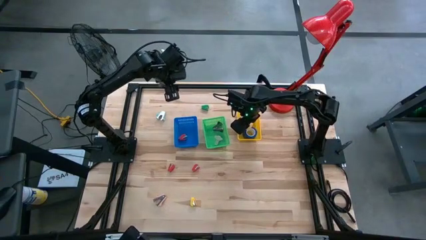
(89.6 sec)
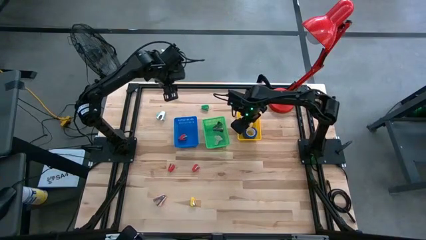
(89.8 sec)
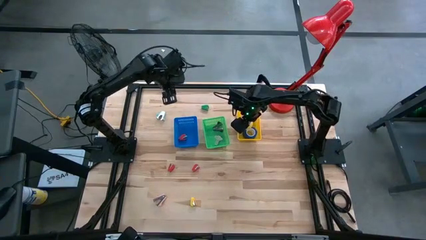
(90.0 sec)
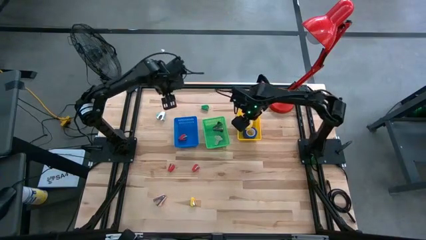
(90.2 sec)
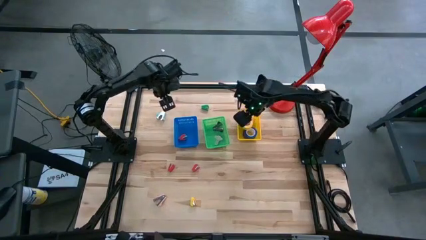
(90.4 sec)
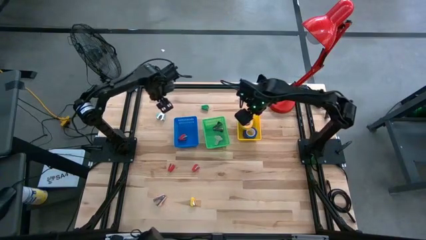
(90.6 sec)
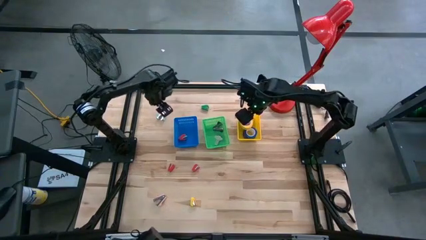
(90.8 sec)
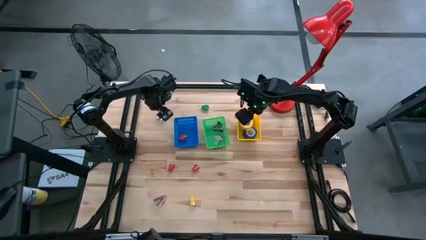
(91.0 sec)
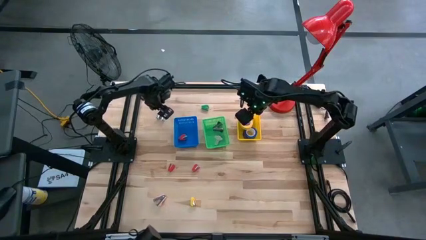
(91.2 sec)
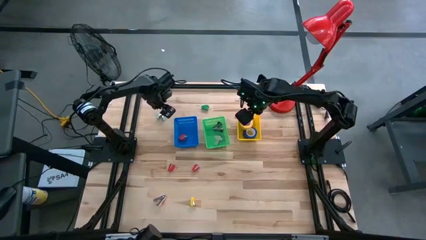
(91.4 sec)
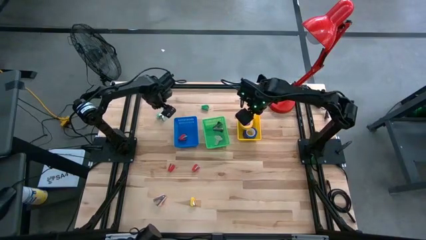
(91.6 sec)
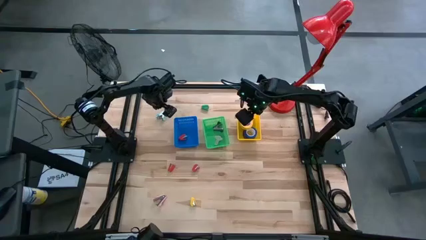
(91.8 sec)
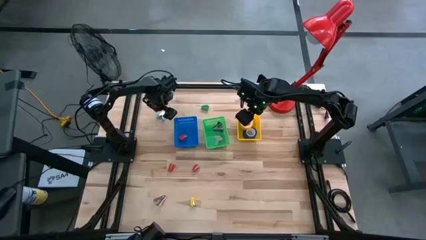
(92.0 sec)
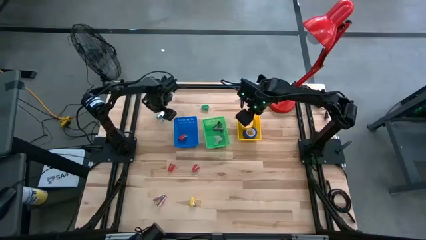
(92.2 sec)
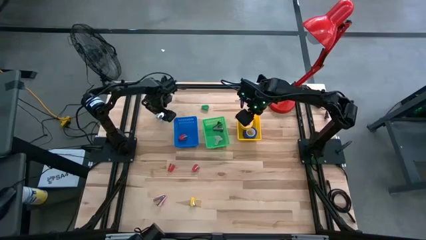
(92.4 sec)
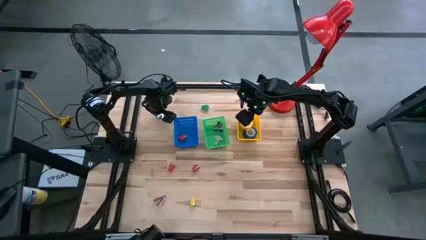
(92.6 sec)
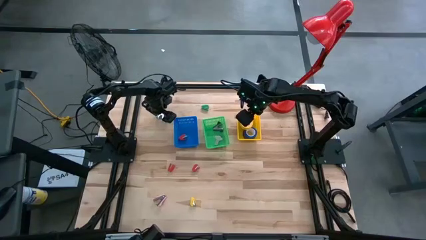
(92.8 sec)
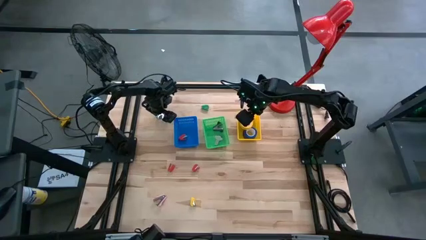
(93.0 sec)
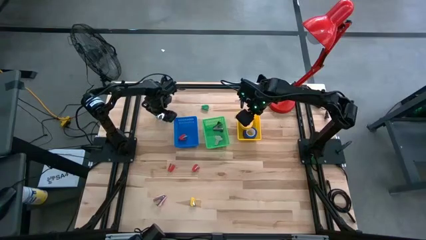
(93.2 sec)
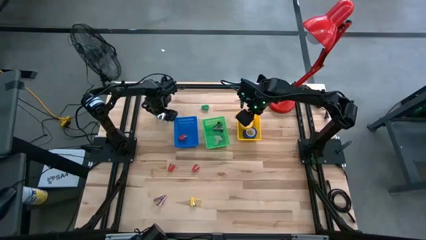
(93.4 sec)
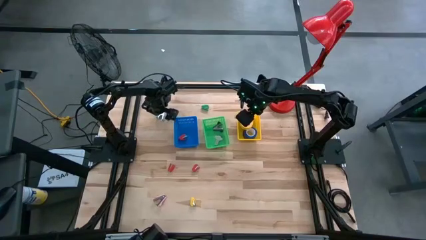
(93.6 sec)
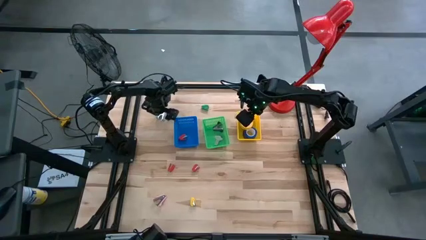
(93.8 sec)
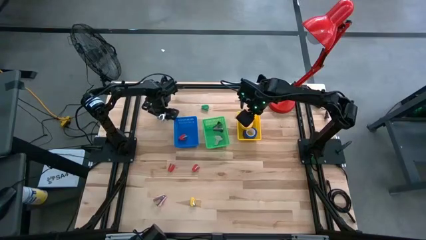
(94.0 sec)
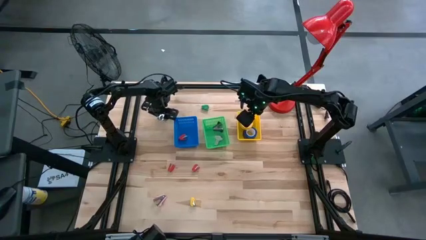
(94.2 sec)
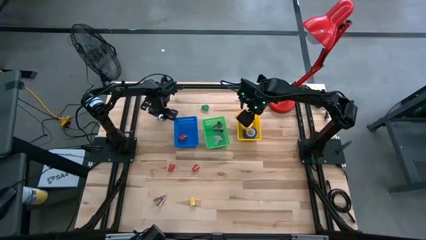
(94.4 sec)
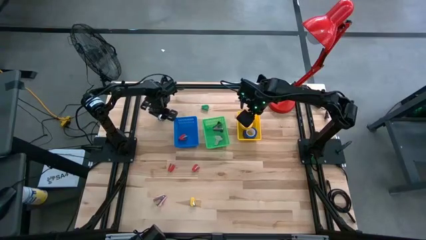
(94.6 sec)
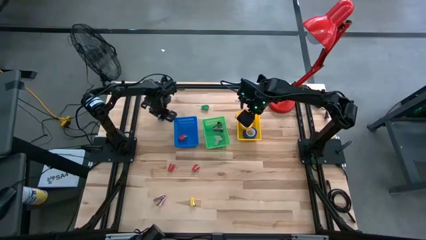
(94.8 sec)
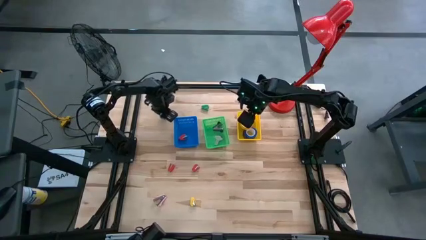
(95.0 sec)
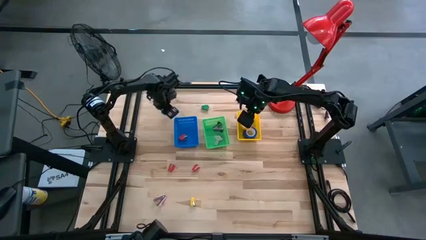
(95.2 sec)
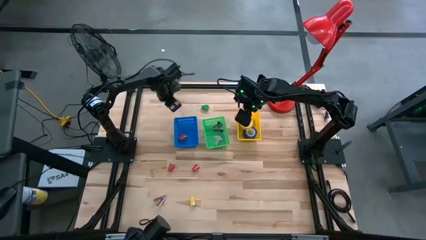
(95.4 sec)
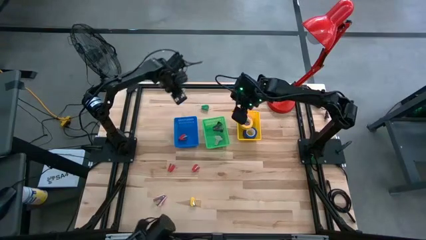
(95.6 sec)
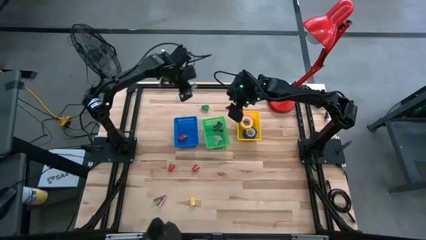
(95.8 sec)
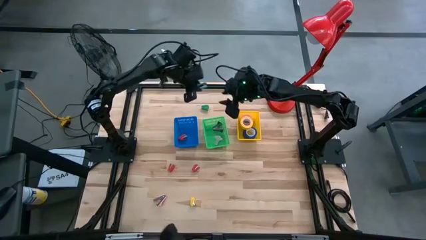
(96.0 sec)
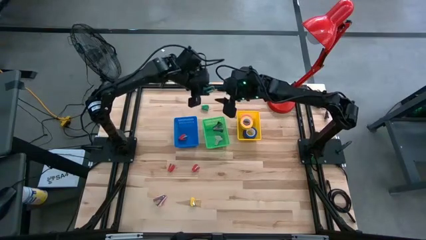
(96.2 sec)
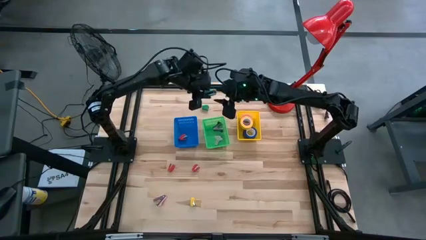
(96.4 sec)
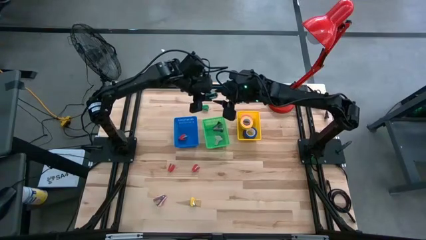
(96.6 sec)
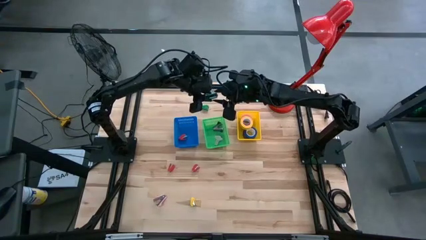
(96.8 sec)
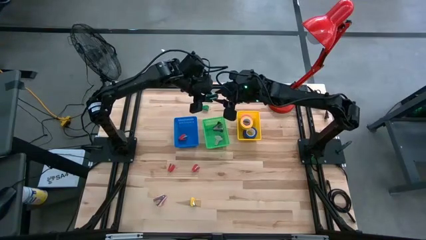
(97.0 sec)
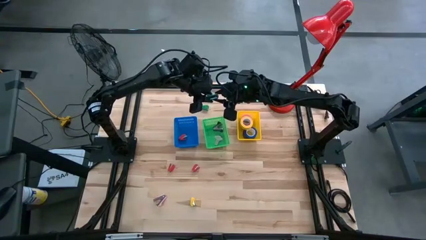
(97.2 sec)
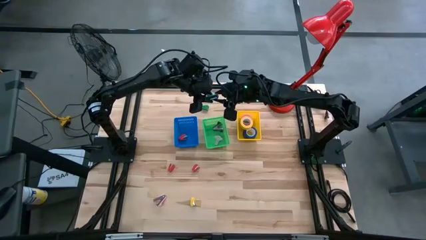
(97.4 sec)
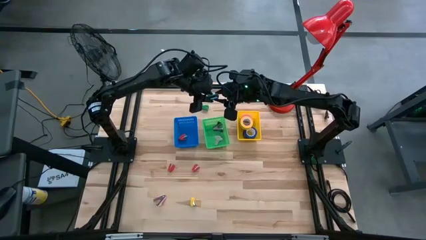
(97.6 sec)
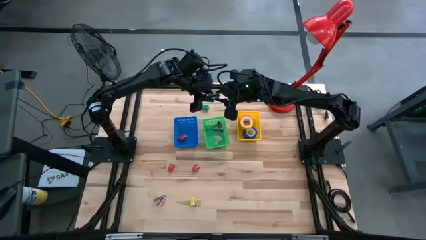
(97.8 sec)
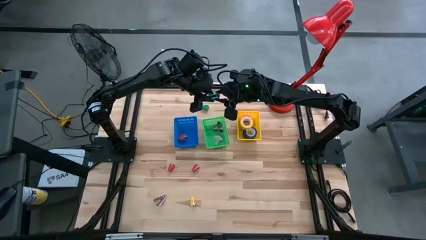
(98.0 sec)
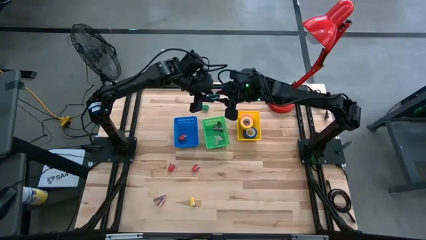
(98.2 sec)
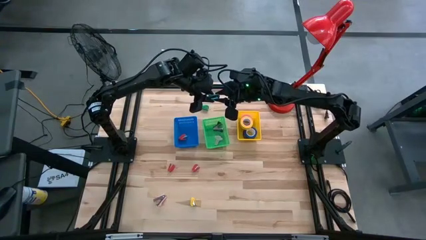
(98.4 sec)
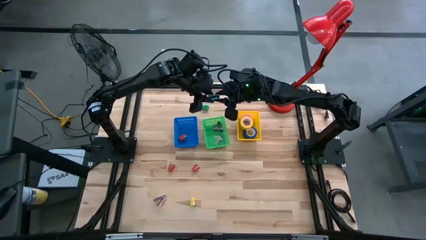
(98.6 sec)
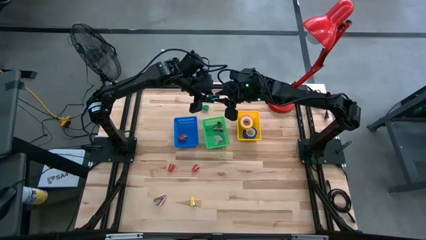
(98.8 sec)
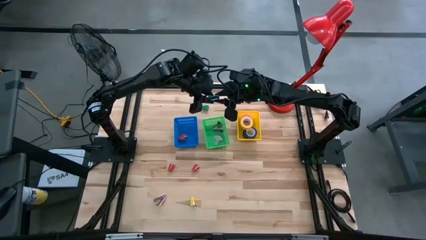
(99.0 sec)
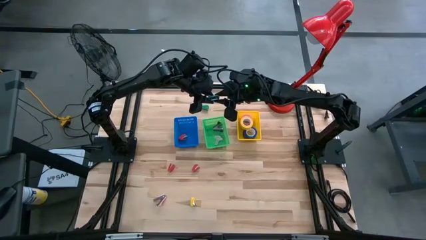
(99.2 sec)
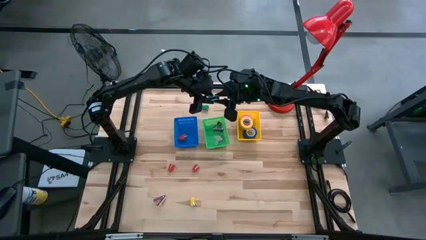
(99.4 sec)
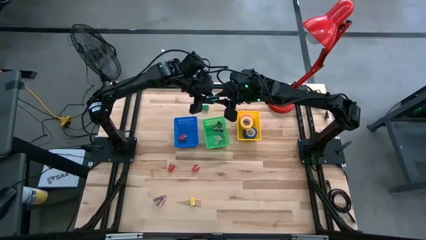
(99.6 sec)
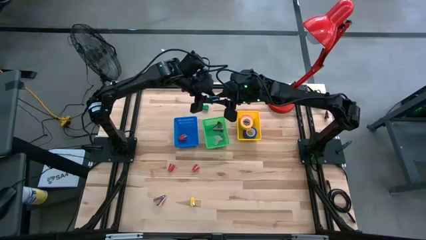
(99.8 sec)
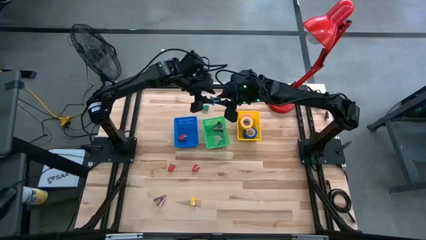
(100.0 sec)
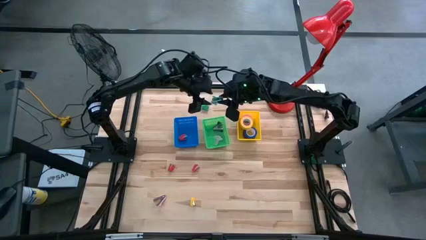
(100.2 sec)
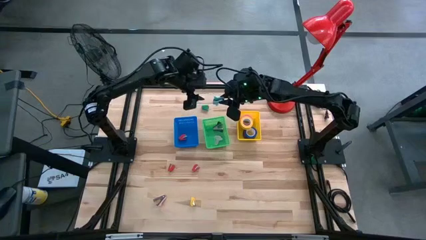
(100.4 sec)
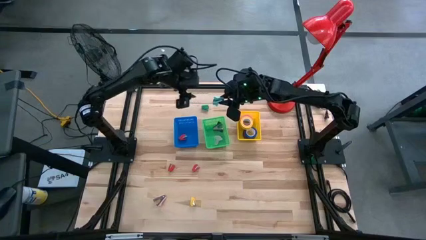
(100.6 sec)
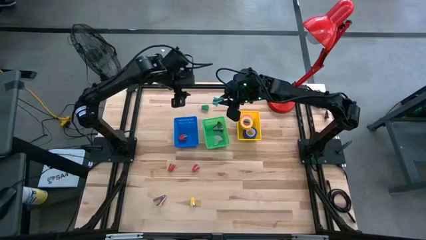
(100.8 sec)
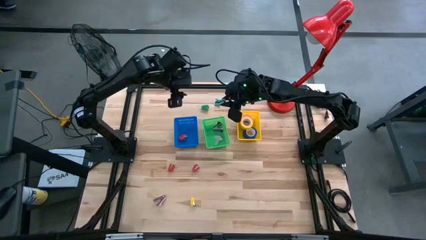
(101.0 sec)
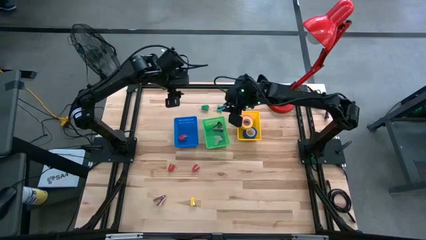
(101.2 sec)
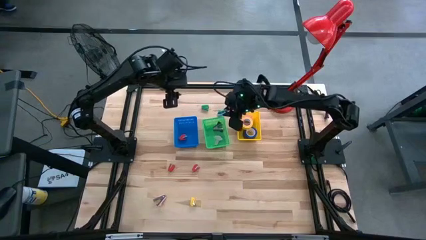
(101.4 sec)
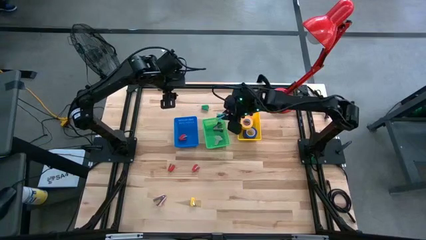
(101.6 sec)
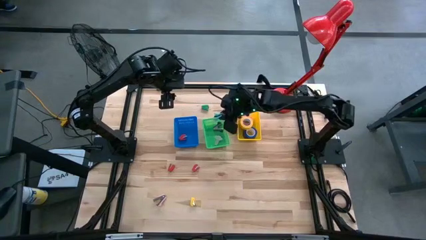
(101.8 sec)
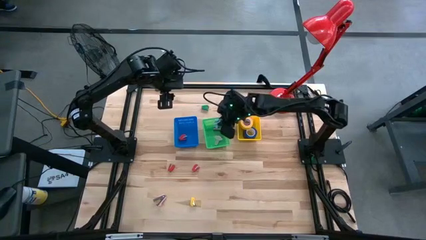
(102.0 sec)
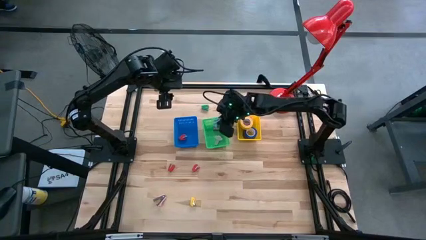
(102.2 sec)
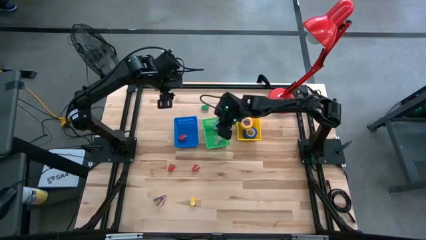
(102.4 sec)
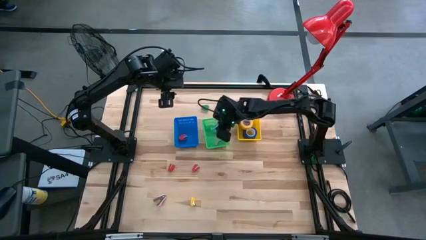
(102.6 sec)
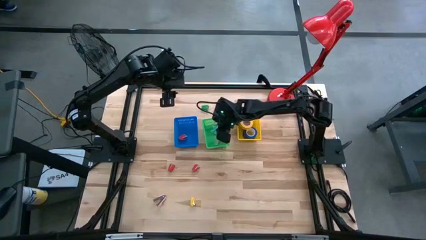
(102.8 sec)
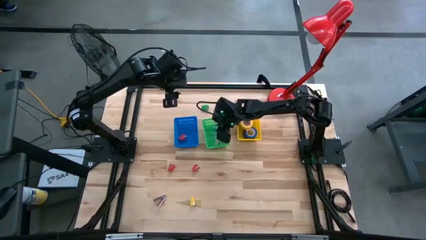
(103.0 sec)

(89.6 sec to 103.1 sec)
Task: Pick and place Stapler, Stapler remover, tape
Put the blue staple remover into the green bin

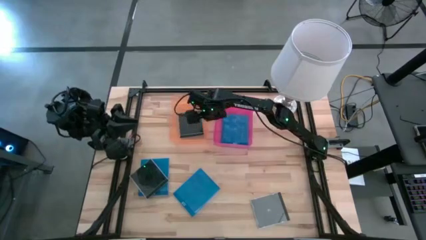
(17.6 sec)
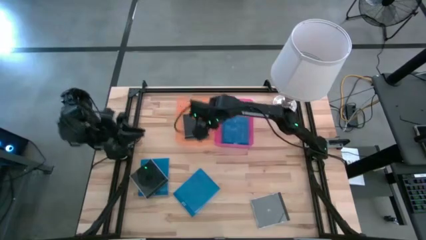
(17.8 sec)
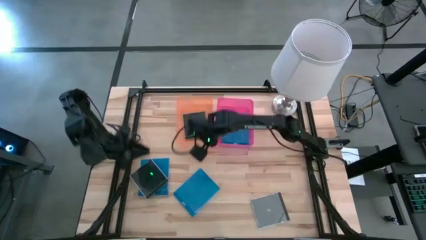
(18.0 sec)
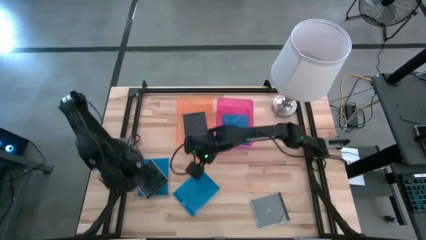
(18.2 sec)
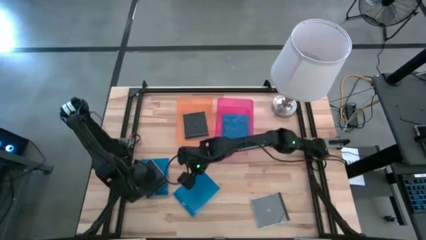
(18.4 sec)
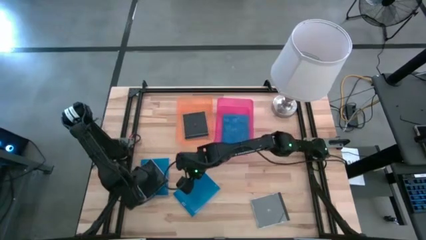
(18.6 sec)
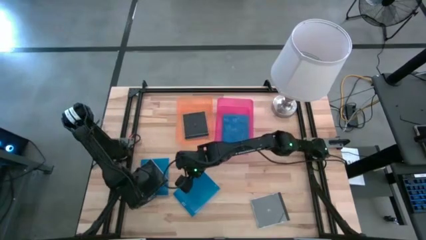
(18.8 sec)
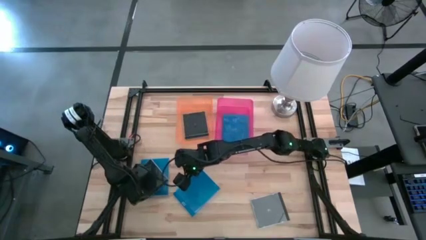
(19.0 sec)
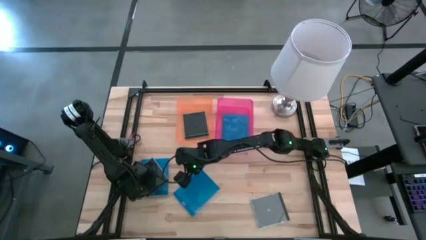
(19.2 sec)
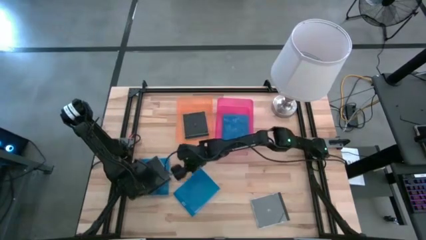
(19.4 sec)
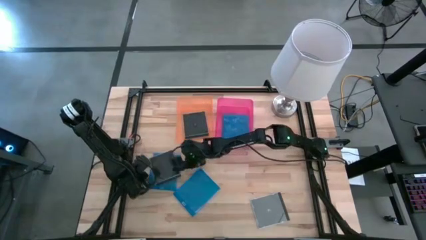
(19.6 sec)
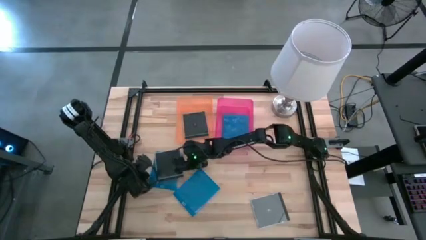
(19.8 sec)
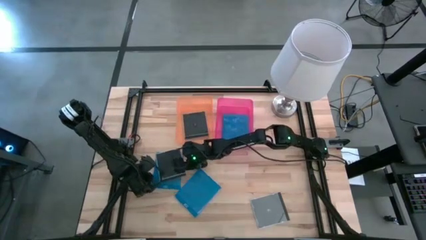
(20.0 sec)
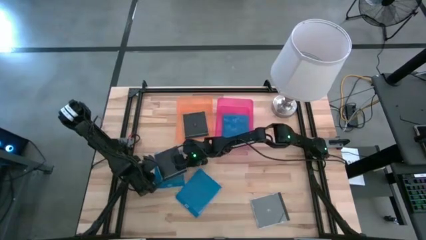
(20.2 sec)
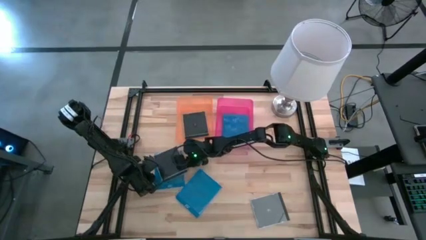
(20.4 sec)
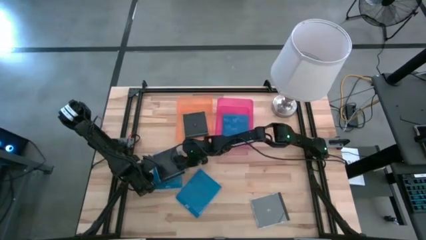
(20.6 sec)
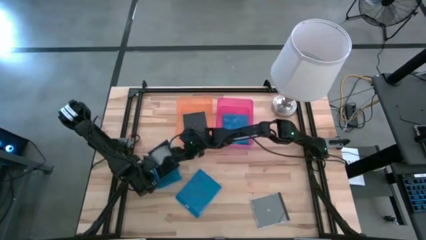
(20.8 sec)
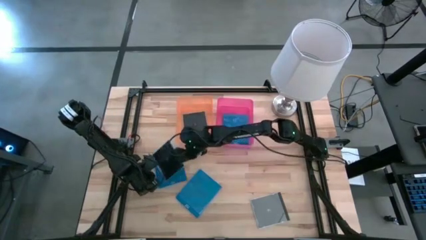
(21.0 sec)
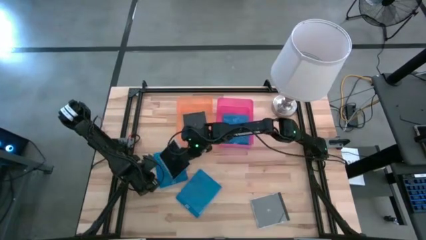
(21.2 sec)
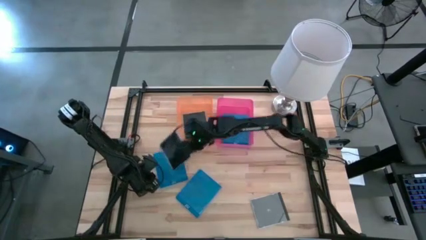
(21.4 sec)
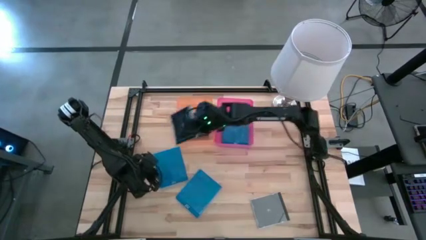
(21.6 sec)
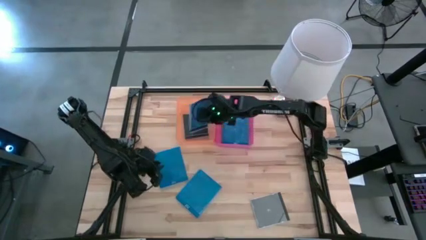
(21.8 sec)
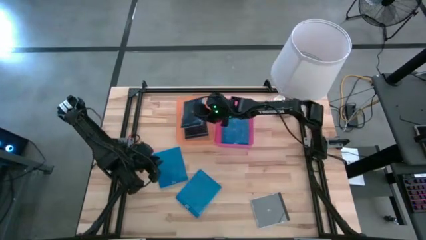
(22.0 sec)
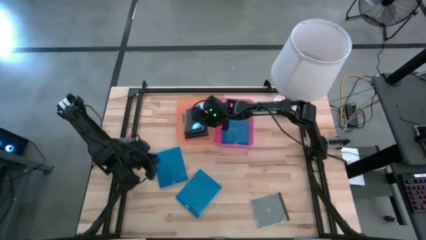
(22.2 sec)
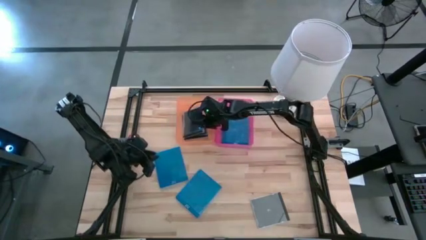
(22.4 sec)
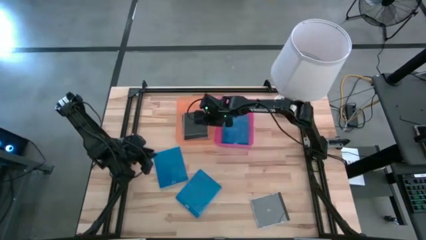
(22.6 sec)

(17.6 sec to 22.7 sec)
Task: Pick & place jewel cases by type
Put the left black CD case into the orange bin
